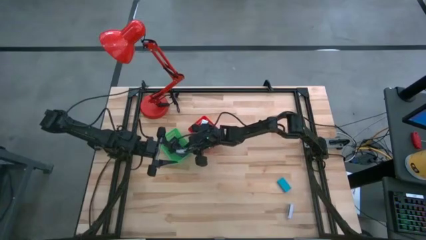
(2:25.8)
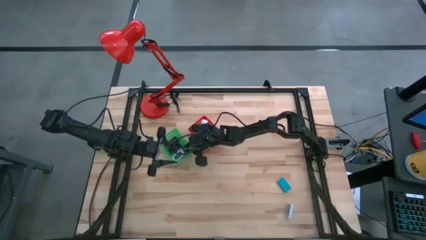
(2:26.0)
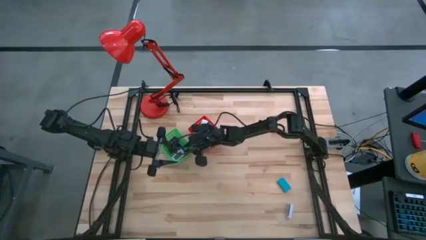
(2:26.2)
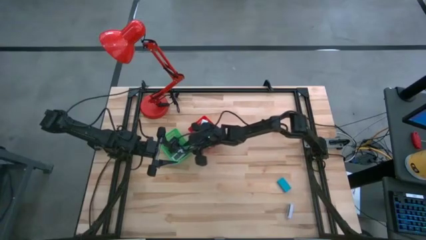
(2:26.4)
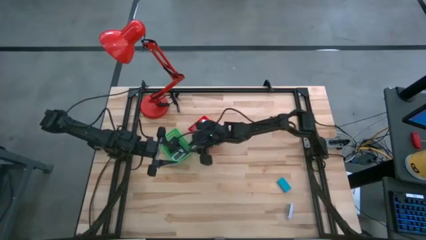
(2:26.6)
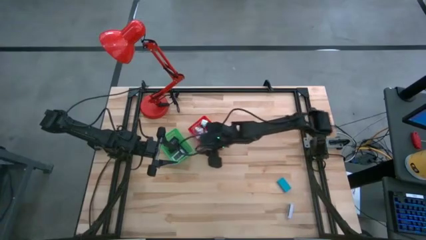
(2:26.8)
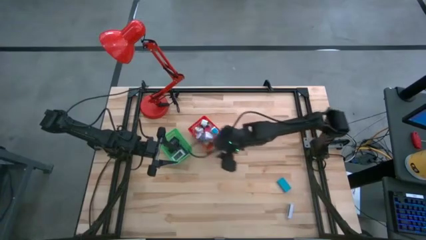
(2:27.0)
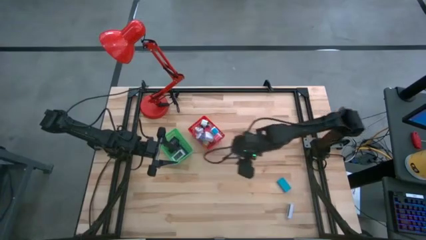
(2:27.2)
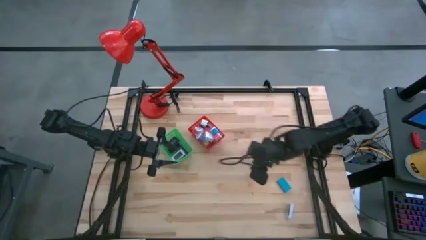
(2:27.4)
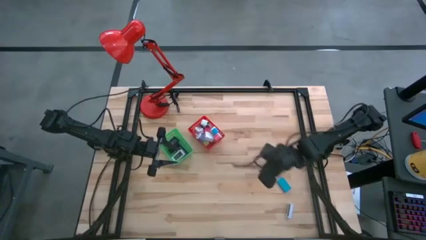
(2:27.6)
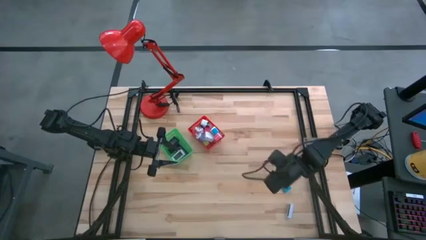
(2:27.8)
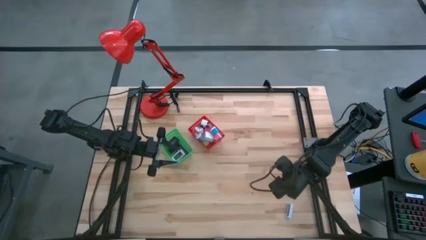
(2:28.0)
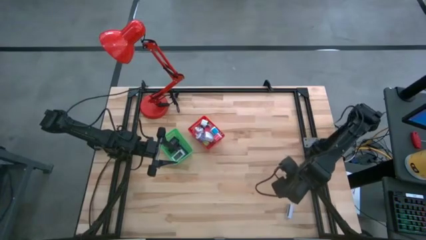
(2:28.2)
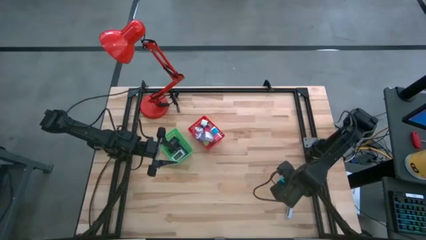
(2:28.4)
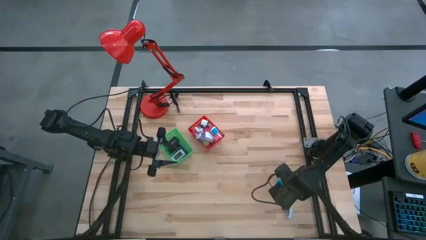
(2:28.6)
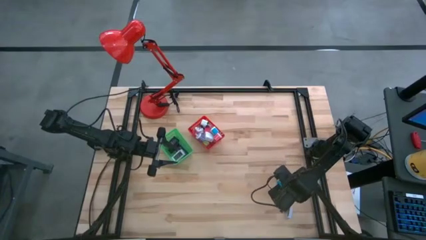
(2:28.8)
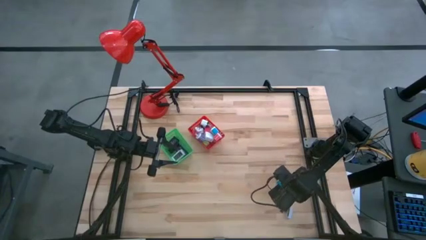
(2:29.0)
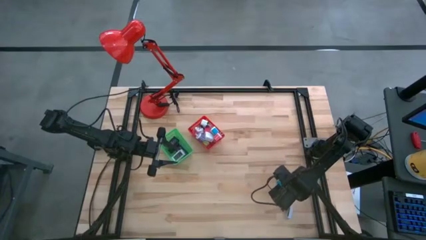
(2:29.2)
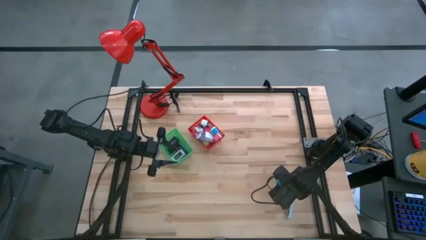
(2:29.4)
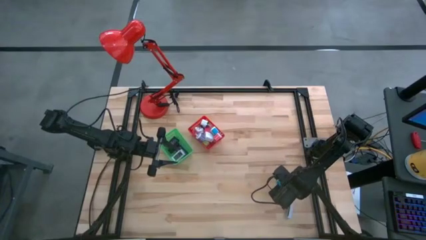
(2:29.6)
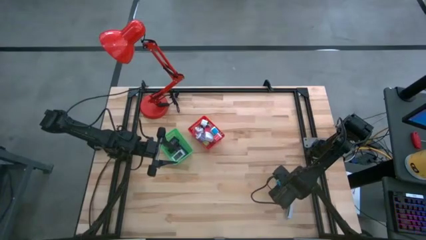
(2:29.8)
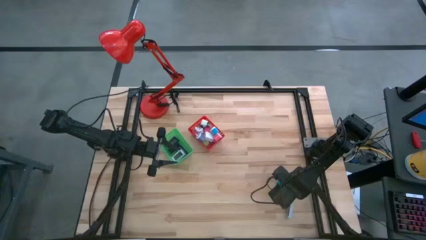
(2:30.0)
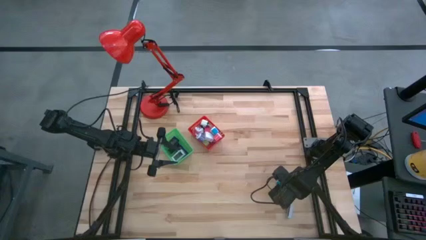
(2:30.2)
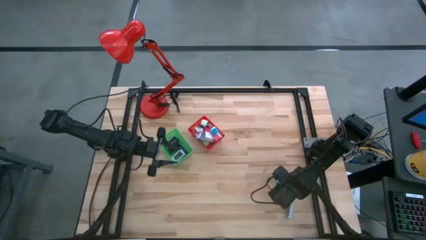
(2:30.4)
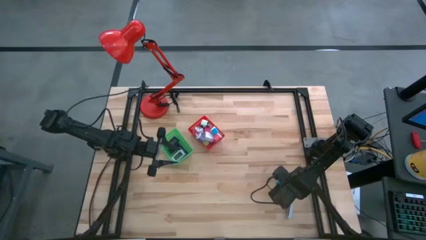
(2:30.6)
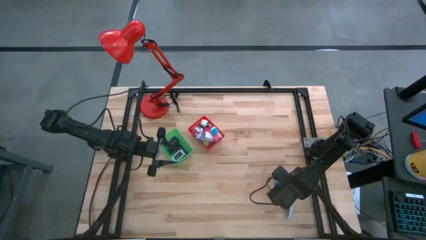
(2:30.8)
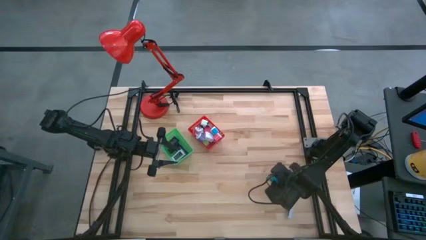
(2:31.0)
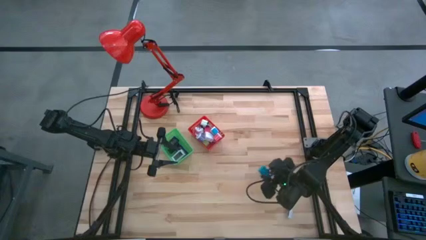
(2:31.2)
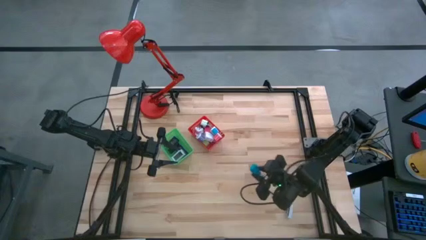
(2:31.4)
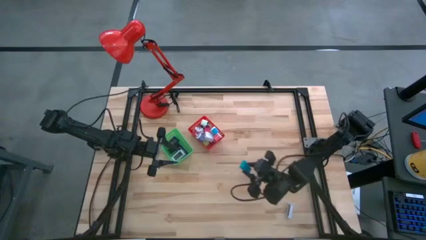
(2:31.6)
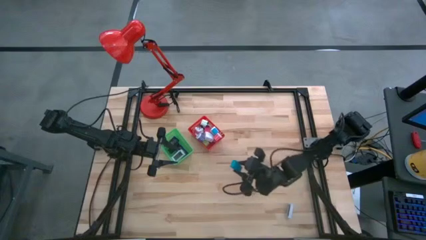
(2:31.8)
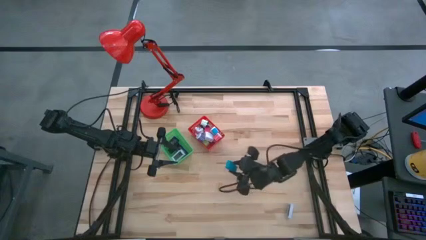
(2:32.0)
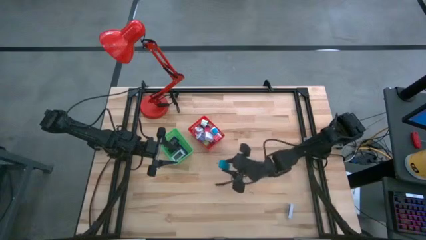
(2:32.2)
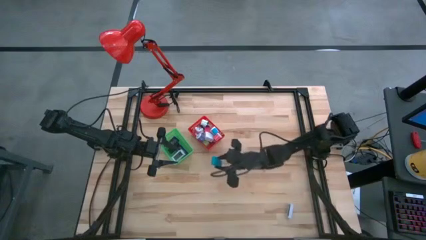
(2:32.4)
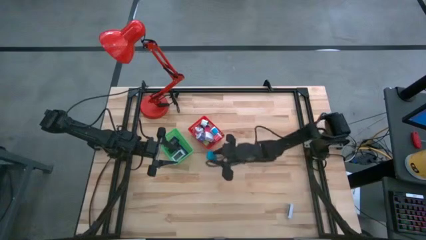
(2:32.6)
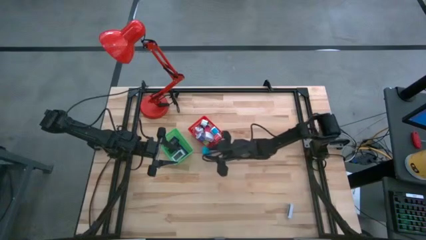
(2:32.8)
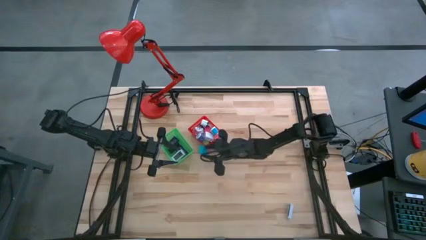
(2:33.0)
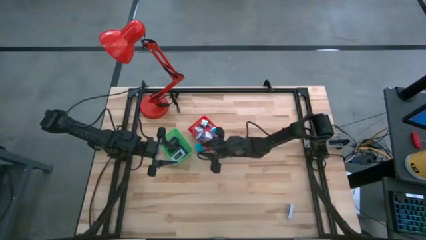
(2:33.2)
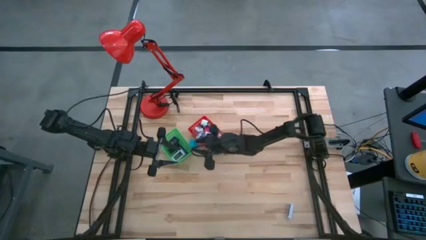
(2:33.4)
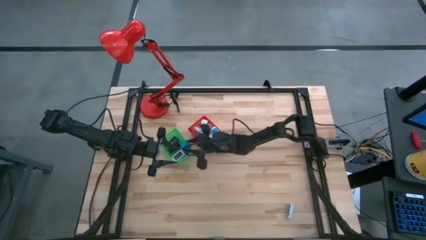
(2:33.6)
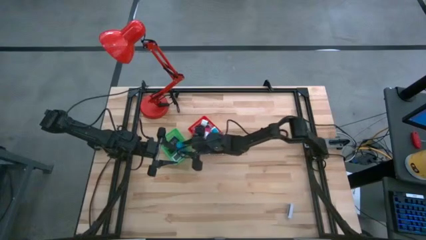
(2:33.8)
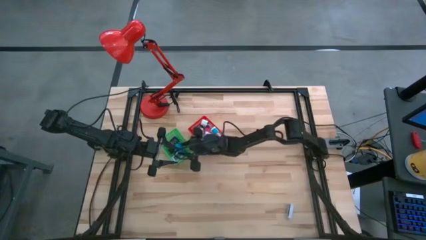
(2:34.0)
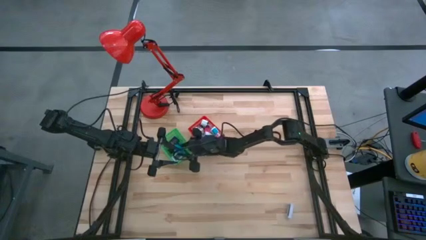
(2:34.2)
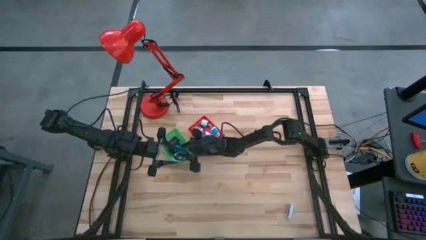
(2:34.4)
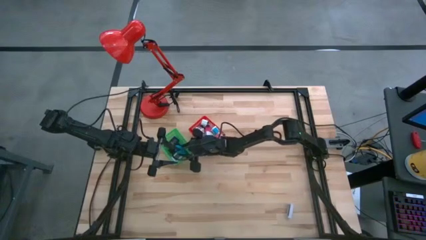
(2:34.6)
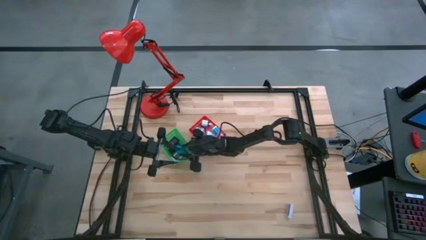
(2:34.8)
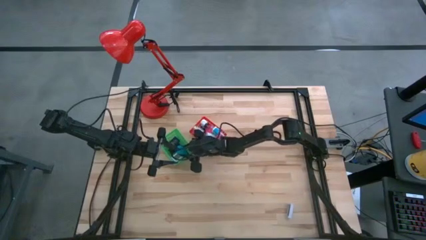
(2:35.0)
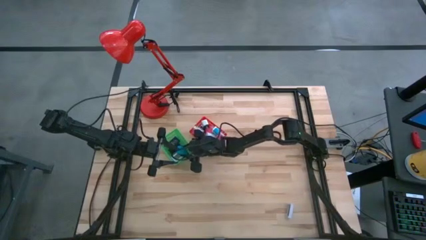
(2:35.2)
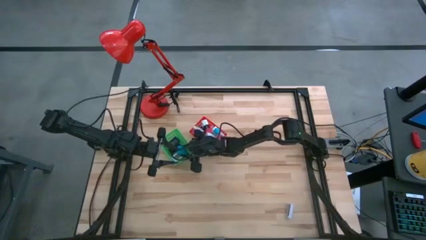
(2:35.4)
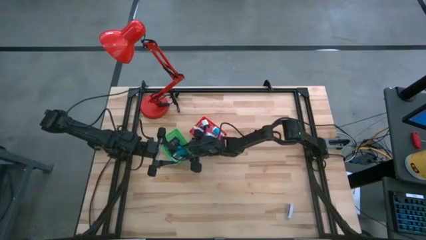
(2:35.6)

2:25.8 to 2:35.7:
Task: Pick & Place Office items
Put the light blue timer into the green bin

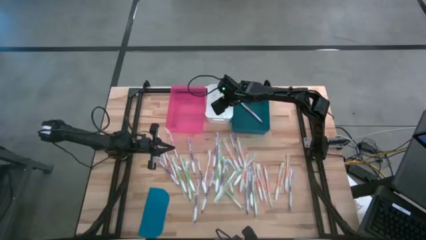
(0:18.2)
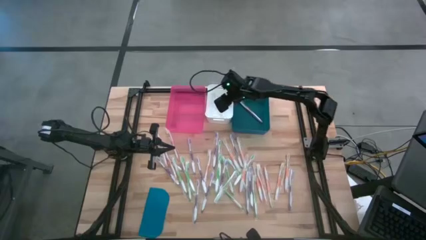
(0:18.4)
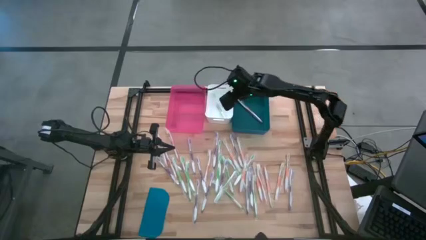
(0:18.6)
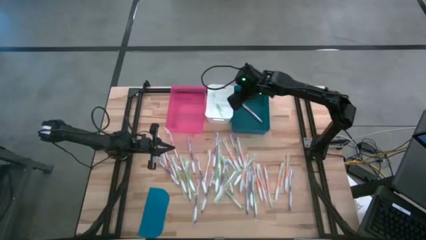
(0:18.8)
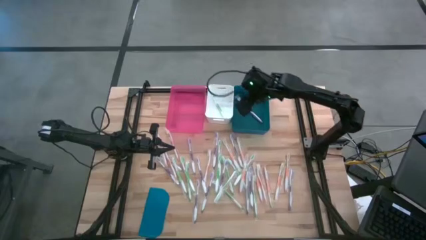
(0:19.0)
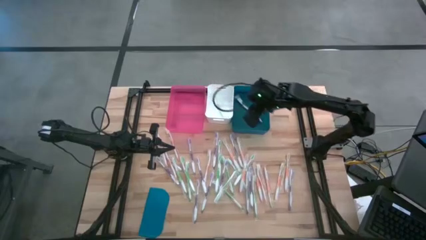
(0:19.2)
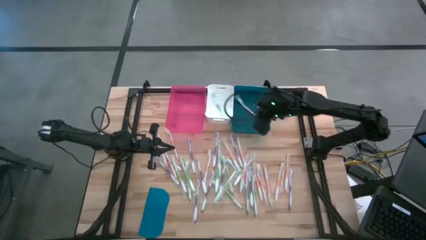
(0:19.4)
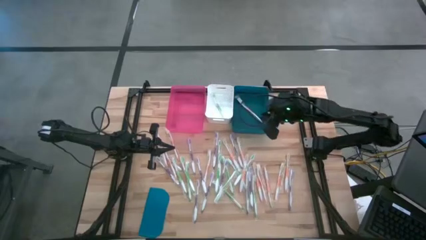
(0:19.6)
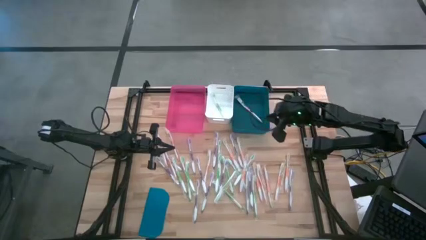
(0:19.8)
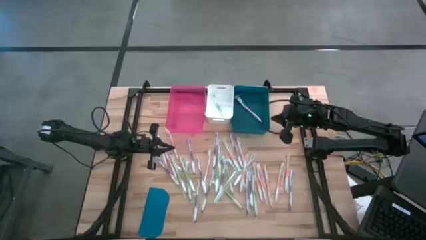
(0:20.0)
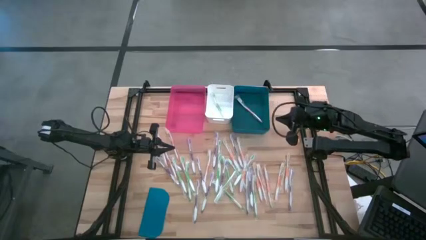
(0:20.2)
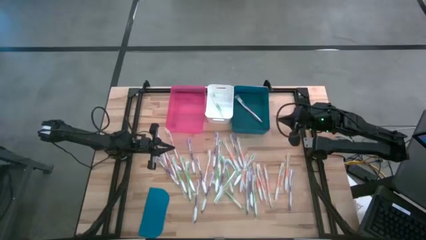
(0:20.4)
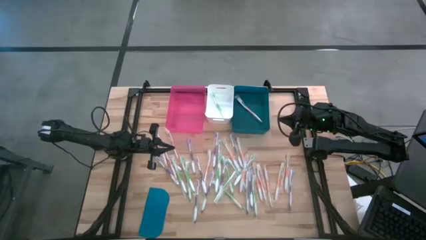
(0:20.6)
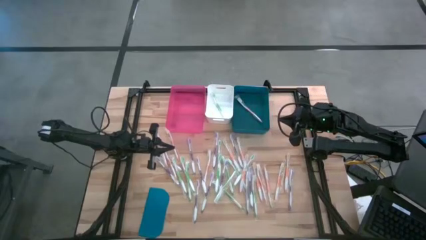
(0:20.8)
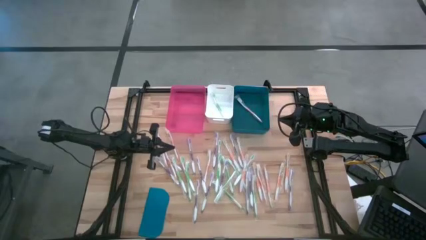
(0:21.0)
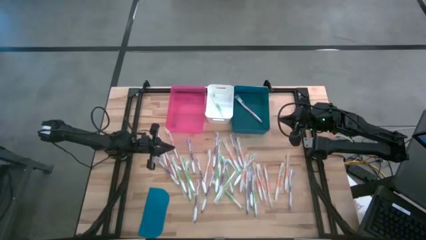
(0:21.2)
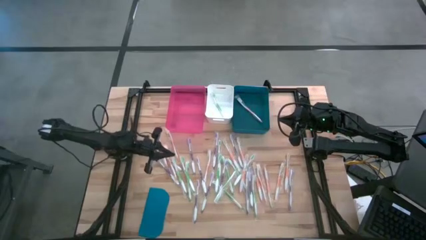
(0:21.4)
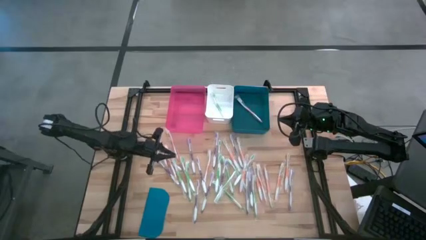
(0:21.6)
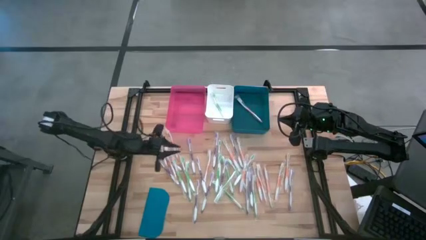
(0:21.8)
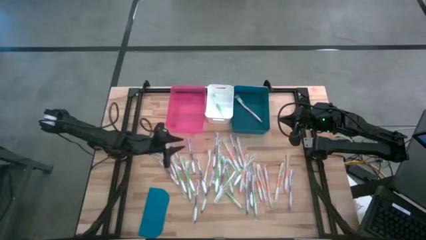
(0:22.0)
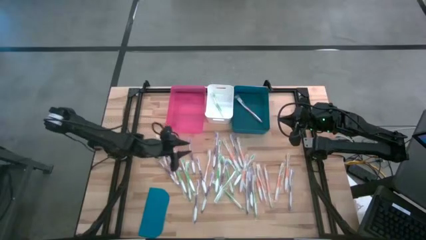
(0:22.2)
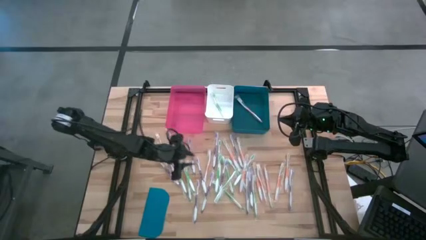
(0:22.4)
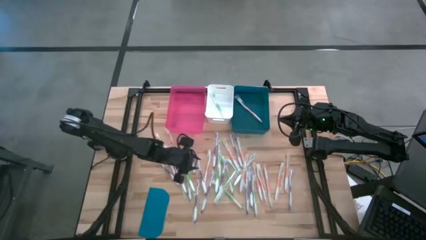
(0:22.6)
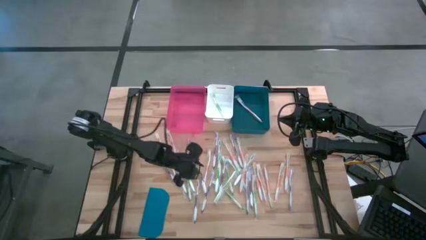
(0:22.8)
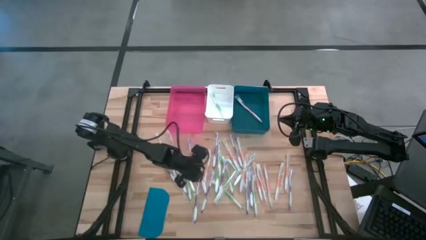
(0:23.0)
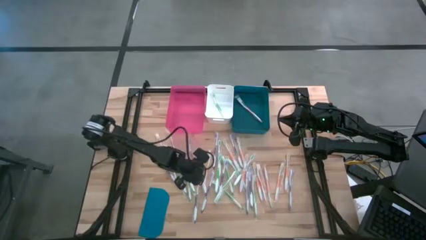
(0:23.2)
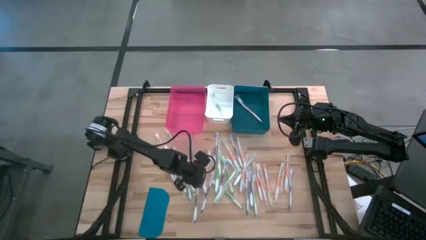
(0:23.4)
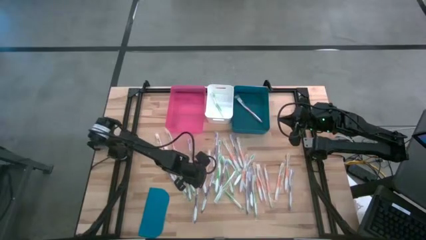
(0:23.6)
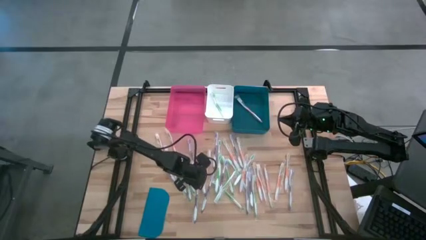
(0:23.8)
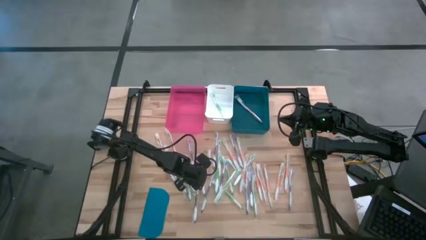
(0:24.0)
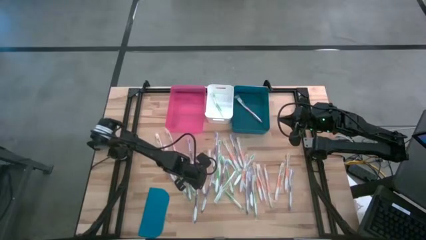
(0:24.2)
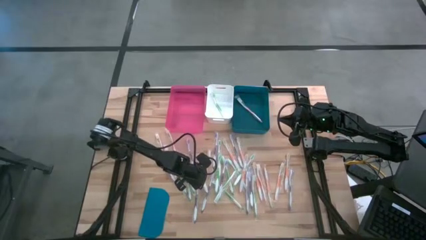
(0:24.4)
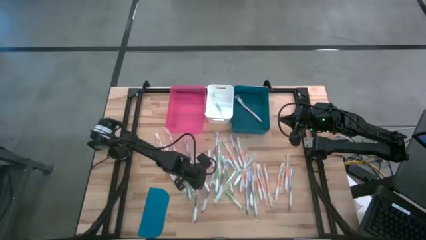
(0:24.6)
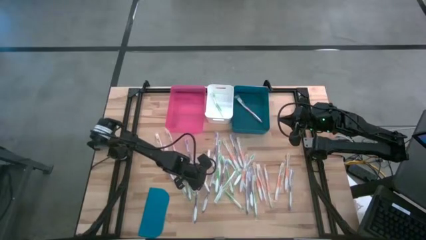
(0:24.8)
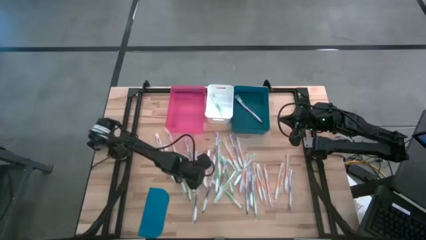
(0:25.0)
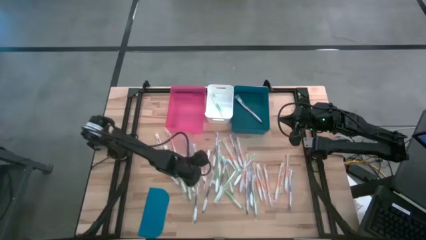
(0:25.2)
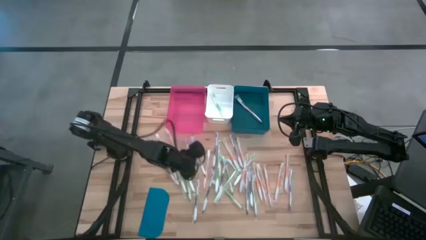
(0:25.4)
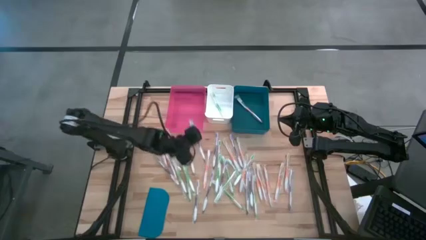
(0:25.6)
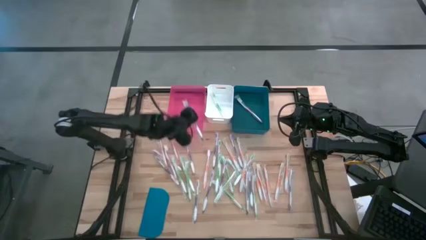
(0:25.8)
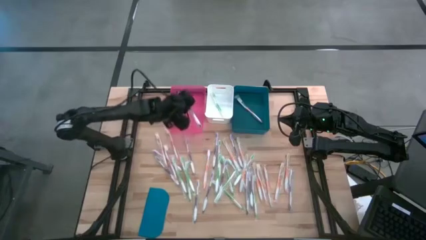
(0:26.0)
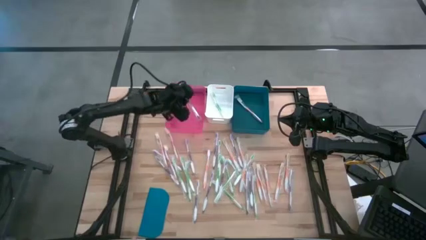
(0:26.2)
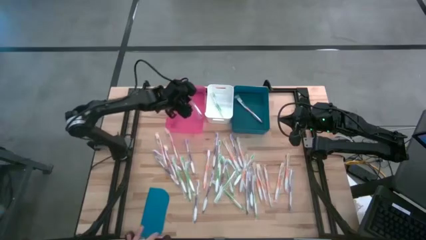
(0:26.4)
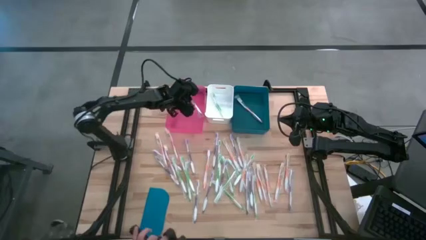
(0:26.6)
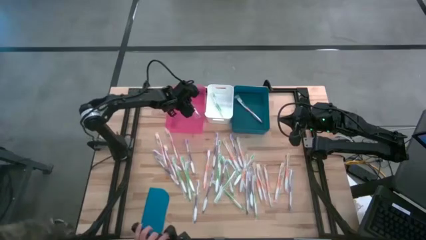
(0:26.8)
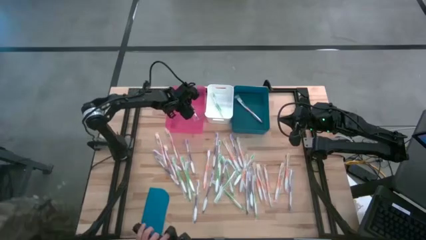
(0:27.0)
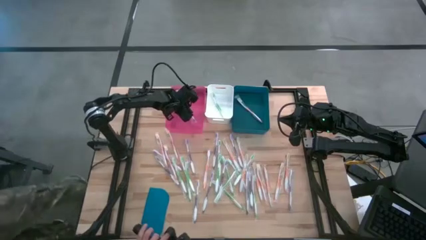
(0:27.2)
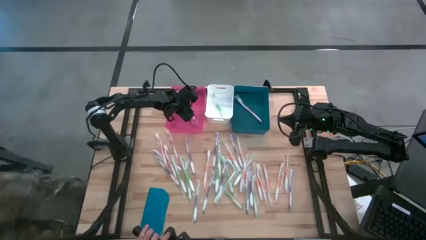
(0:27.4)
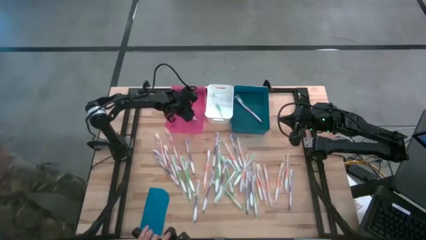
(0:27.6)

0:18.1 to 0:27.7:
Task: Pick & Place Toothbrushes
Put the violet toothbrush into the pink bin
